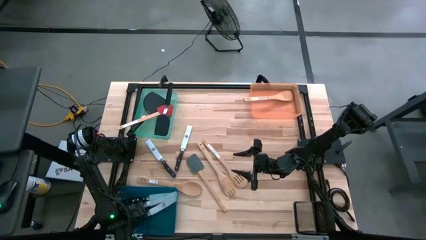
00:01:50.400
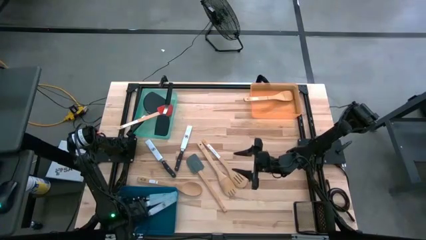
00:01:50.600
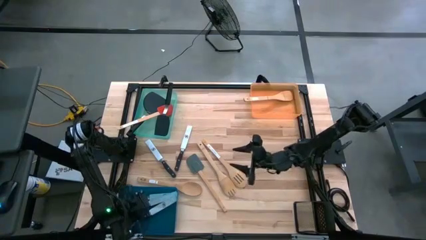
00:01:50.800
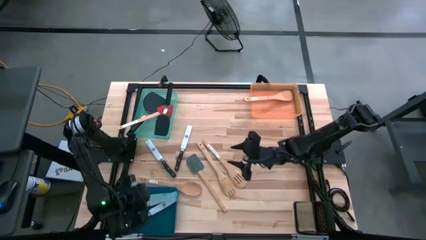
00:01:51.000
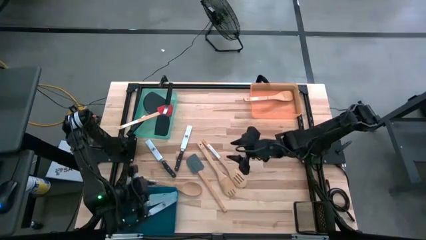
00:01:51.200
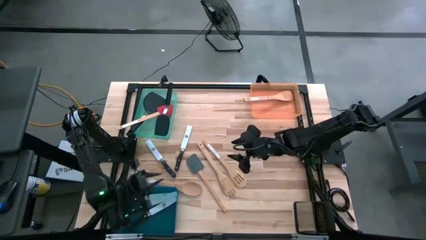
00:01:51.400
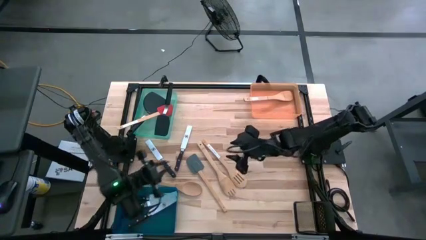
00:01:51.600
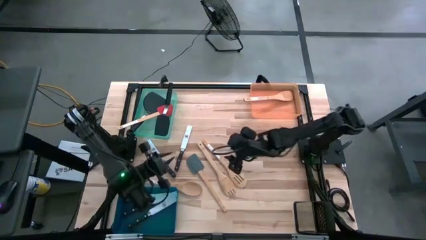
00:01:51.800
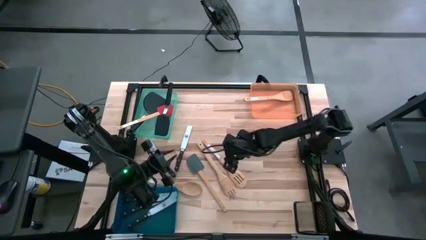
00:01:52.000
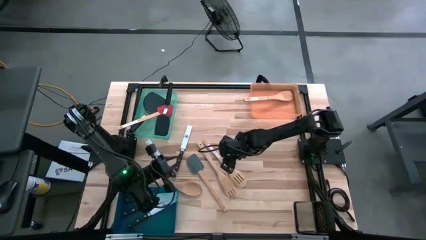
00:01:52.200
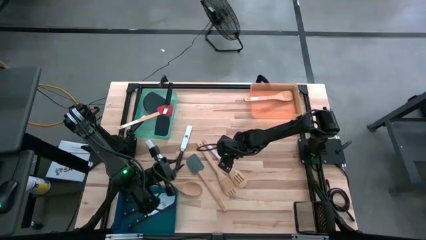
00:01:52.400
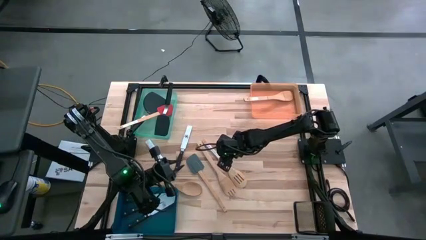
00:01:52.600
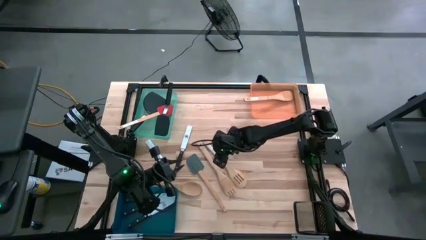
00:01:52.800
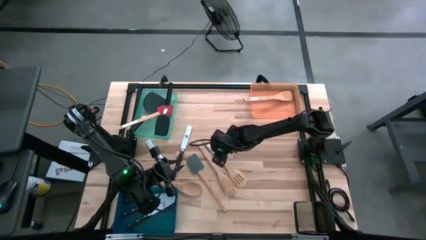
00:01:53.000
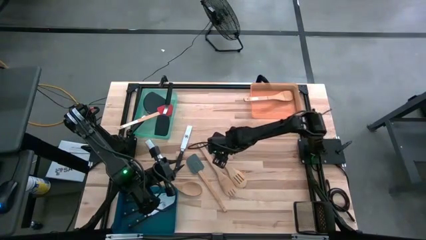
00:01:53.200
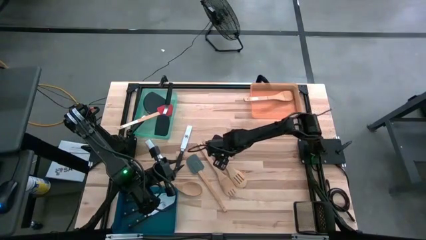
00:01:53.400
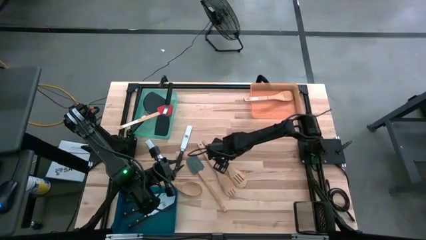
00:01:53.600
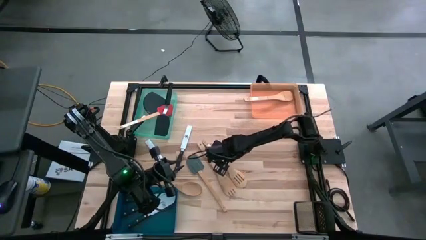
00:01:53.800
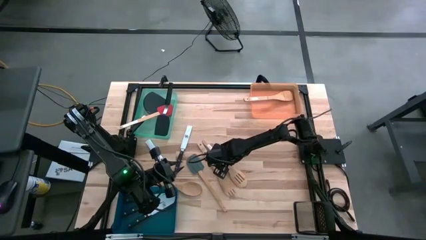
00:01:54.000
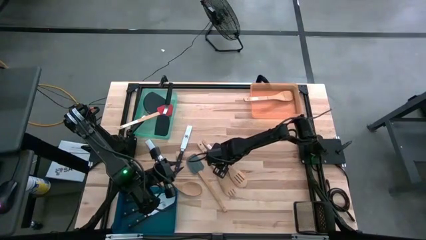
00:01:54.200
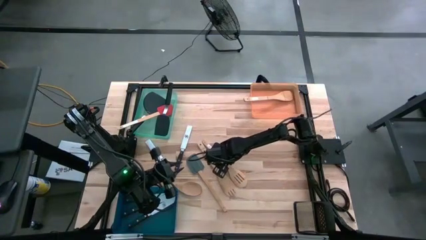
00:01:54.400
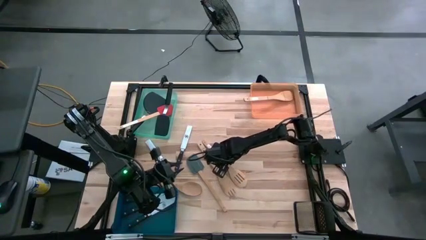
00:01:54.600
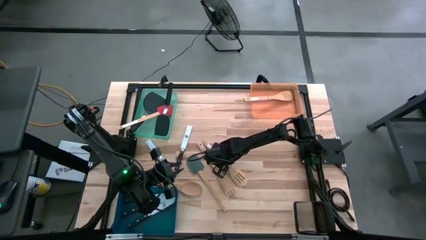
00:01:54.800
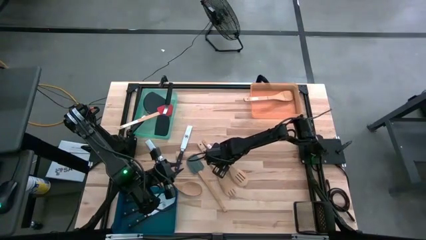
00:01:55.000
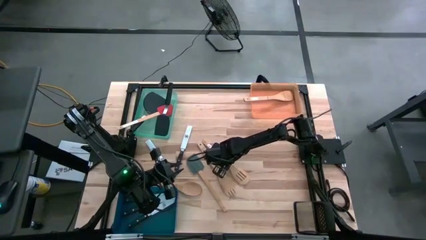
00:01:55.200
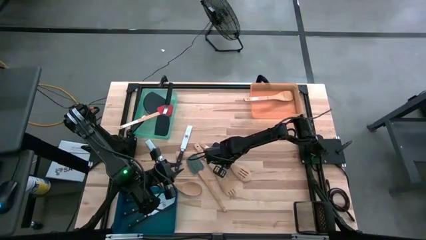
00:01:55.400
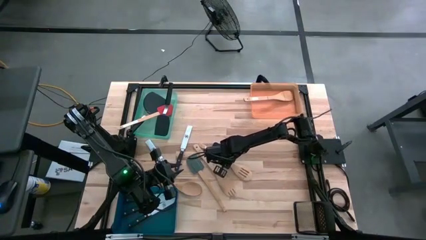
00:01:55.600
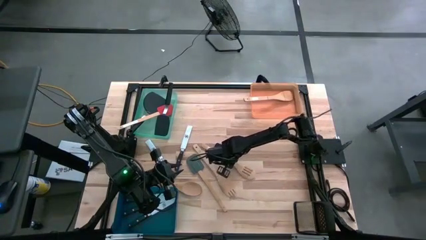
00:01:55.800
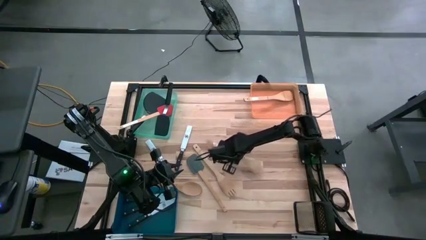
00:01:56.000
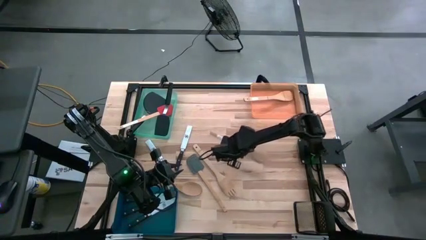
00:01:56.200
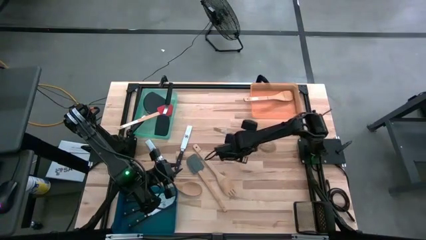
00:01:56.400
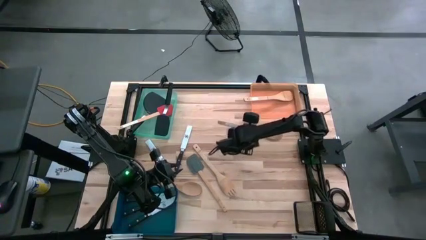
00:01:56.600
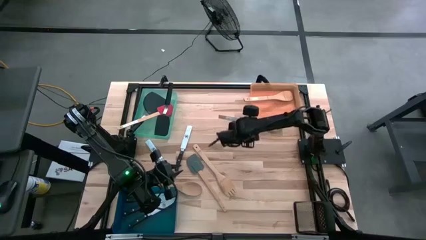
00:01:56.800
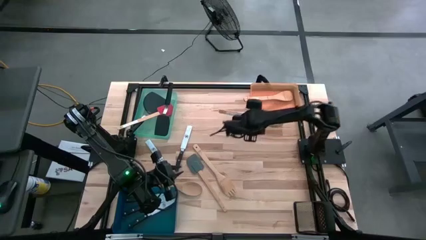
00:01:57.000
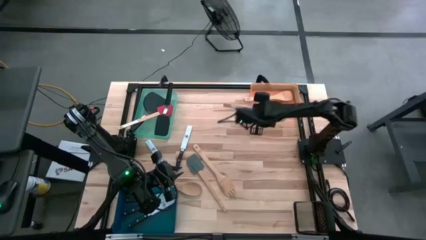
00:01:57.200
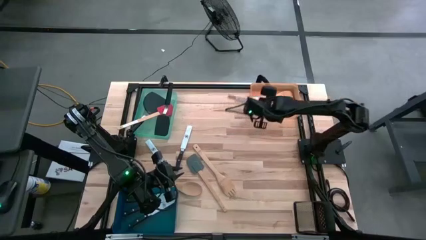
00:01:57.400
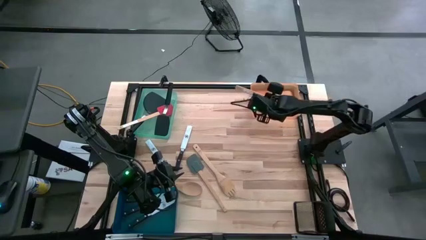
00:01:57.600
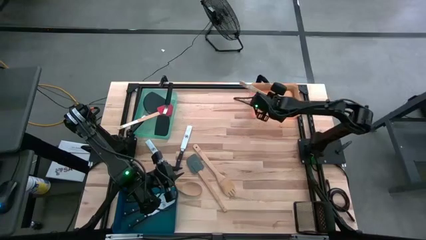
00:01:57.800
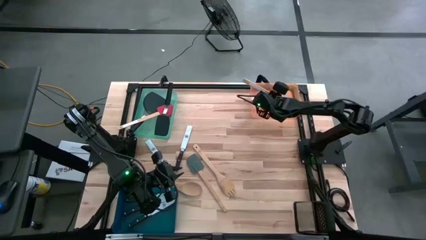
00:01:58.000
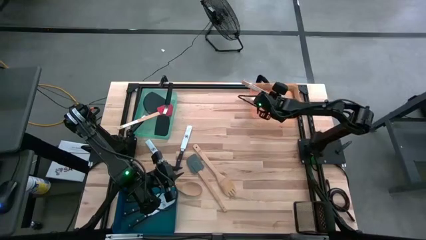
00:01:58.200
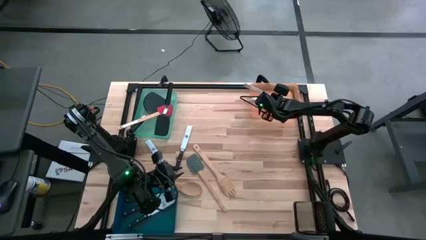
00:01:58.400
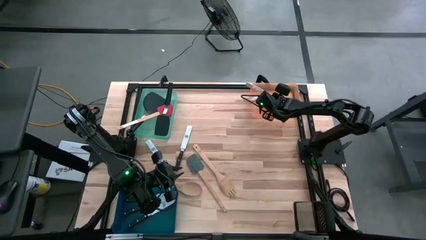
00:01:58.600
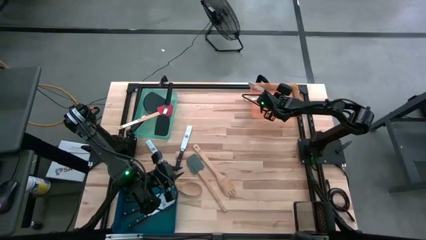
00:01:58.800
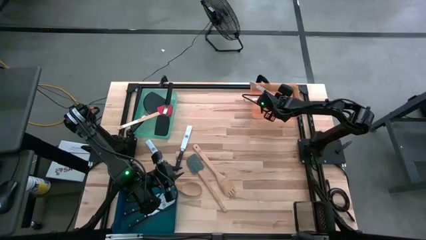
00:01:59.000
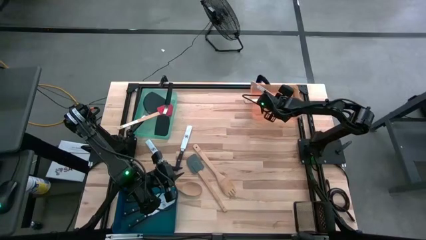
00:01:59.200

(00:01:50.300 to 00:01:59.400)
Task: Pick & Place Kitchen Items
Put the brown wooden serving spoon into the orange bin

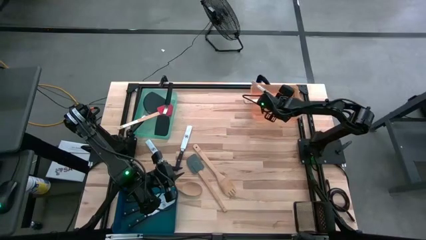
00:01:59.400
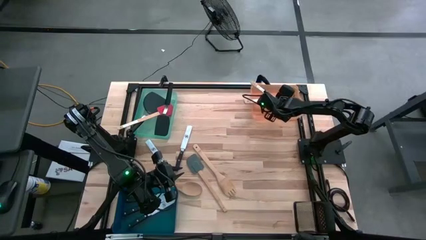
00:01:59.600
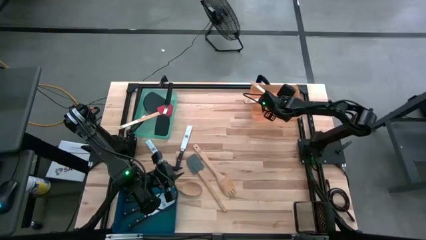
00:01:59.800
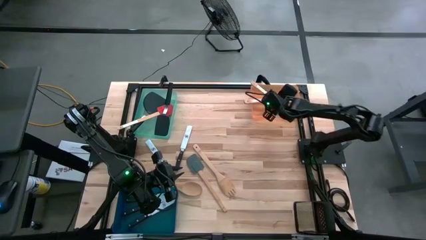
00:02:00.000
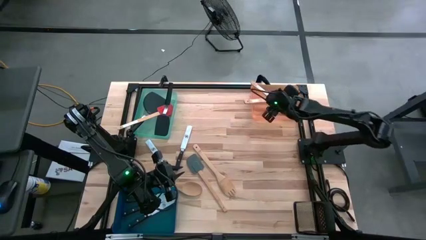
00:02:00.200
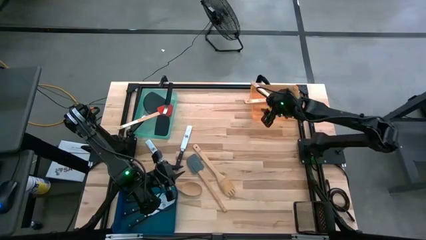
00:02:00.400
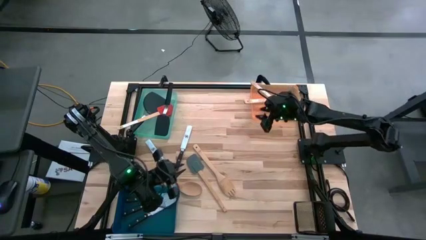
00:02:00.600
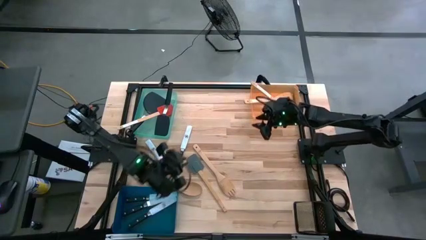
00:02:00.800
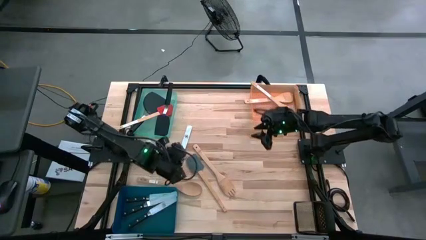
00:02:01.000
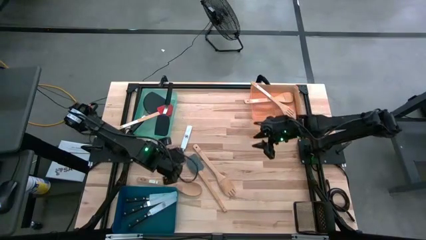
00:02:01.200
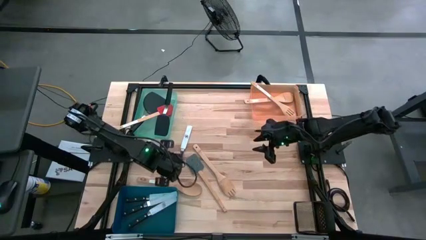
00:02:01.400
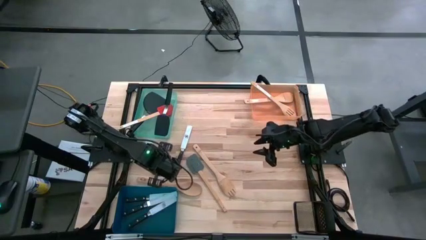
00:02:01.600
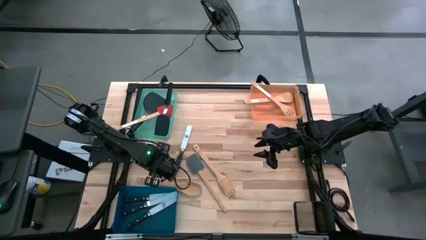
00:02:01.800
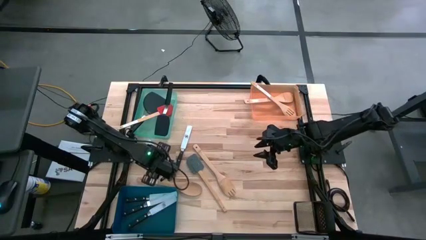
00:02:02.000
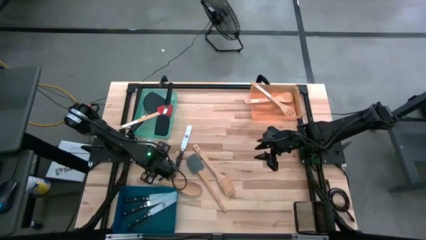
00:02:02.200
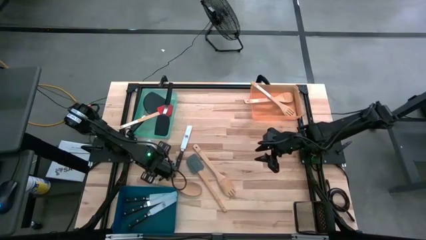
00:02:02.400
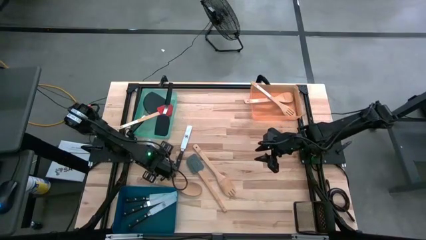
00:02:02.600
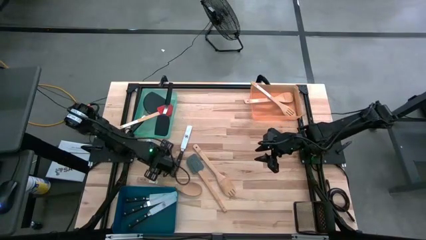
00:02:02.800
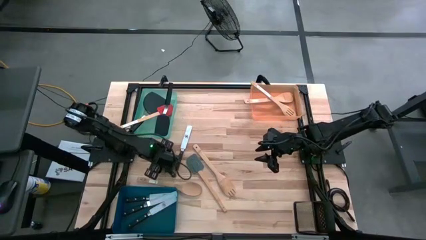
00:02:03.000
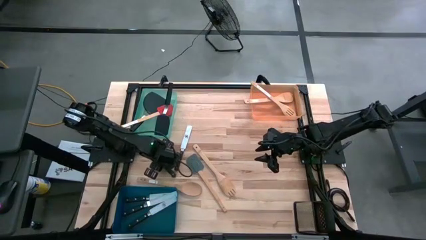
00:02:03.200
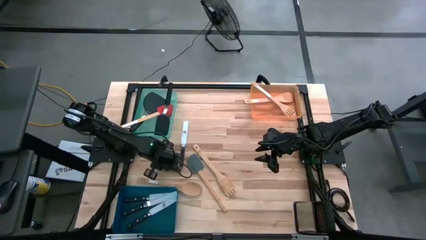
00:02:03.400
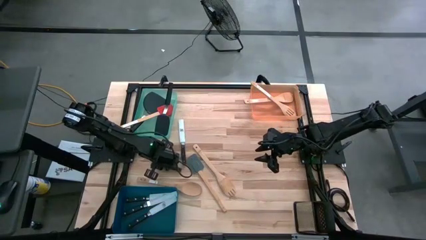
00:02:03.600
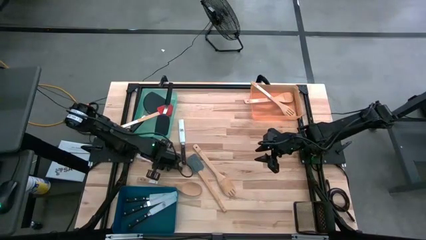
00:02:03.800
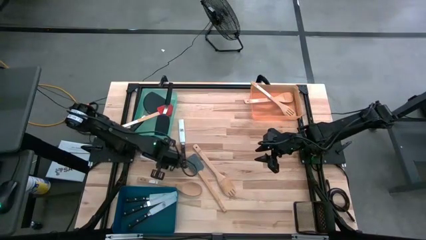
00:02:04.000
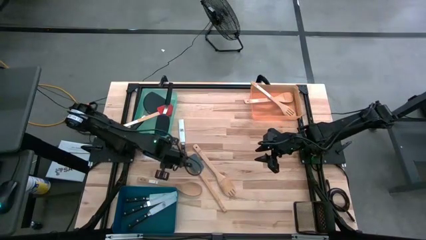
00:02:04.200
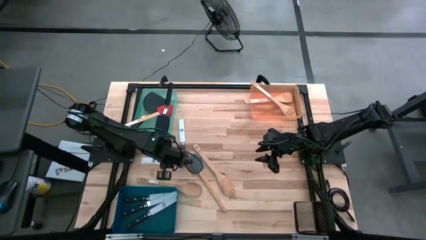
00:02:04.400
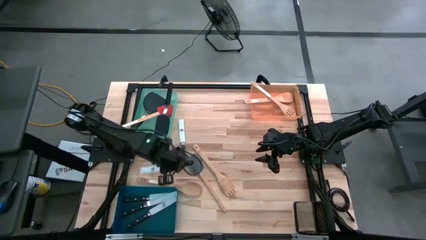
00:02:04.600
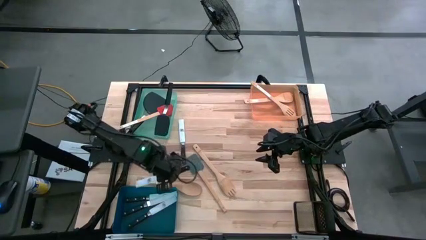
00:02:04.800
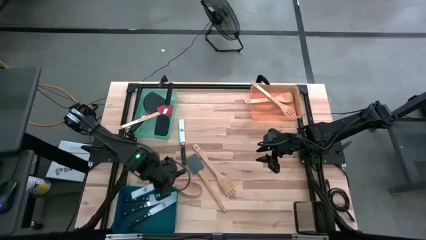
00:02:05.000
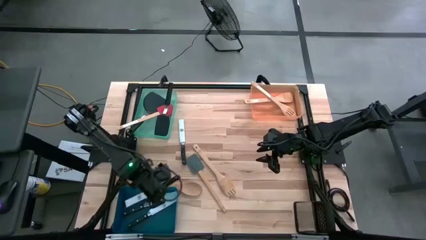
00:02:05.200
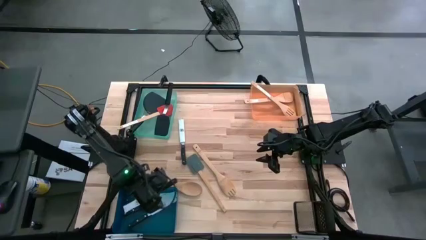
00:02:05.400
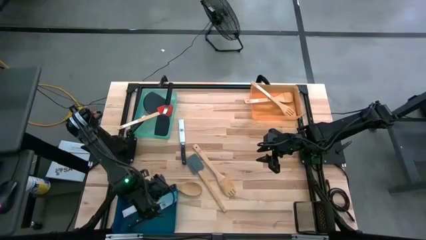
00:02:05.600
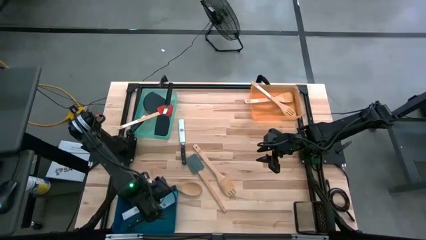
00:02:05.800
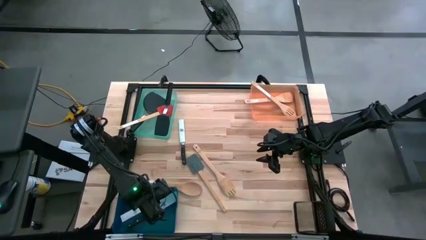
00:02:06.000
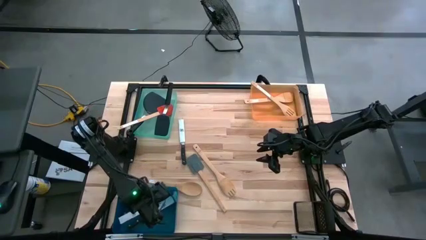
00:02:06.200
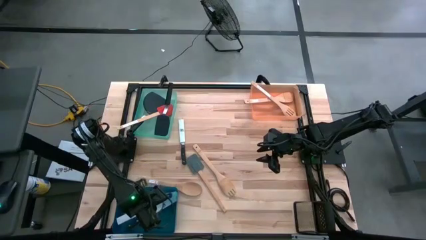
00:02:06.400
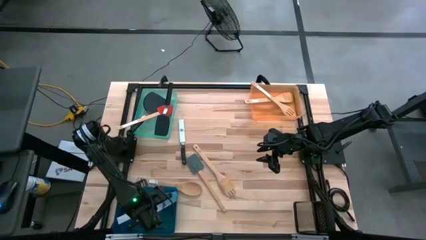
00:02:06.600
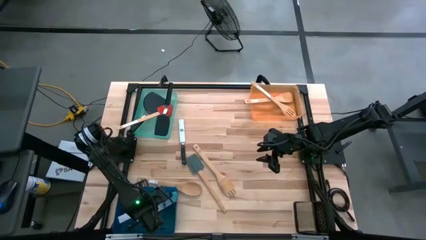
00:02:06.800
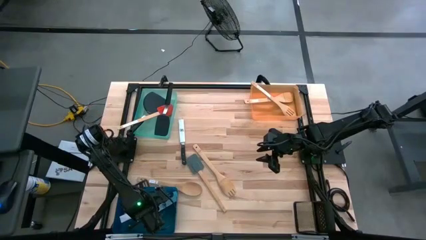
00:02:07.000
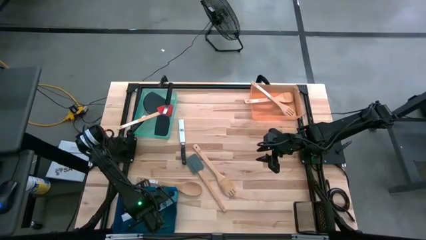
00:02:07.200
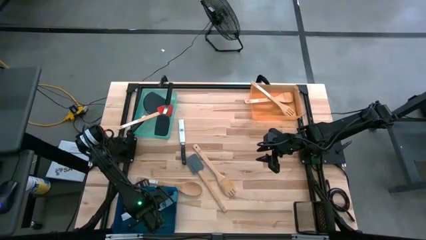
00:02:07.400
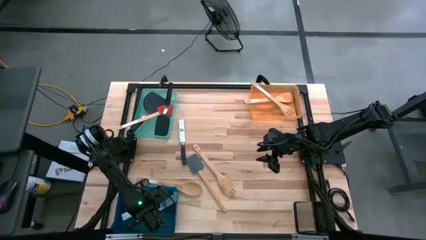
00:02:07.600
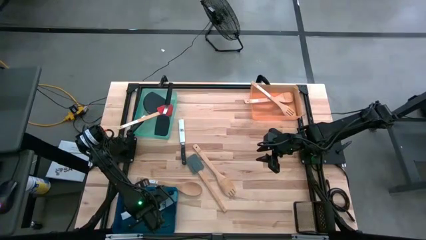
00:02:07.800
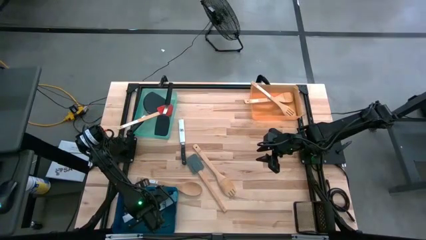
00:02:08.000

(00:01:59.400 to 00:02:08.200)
Put the black knife into the blue bin
